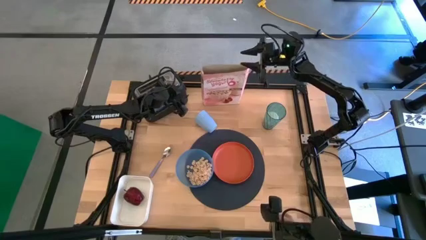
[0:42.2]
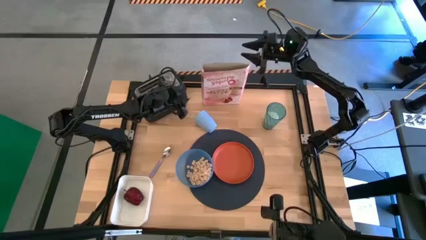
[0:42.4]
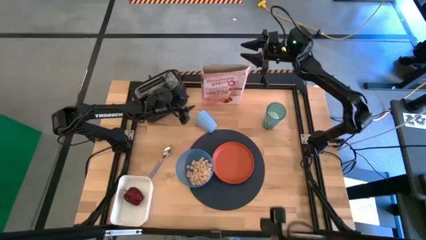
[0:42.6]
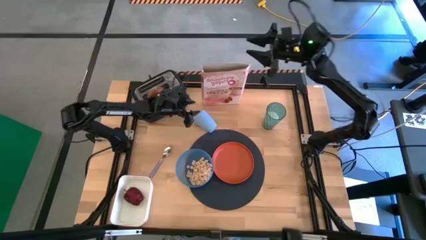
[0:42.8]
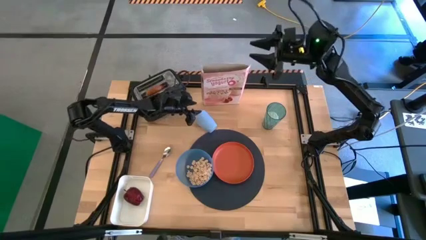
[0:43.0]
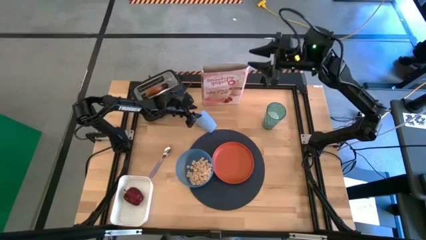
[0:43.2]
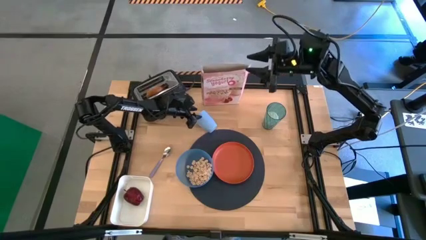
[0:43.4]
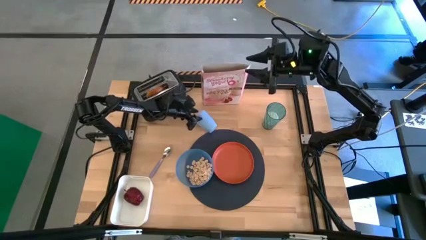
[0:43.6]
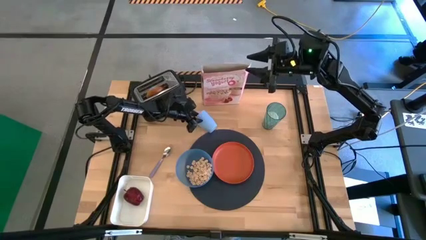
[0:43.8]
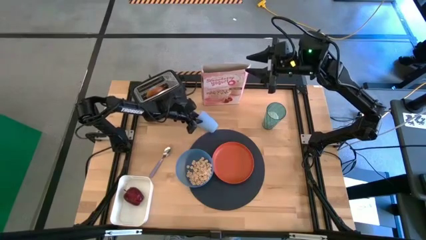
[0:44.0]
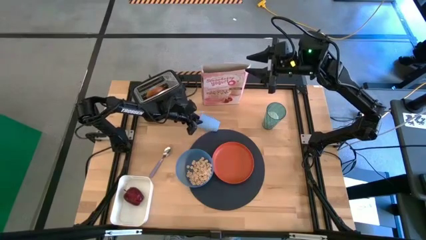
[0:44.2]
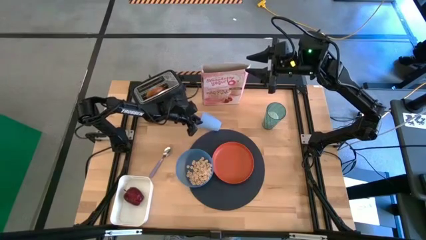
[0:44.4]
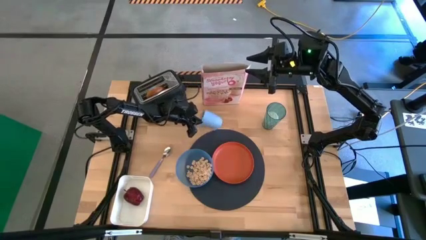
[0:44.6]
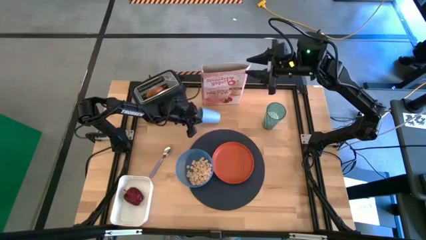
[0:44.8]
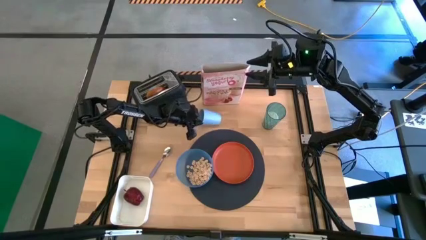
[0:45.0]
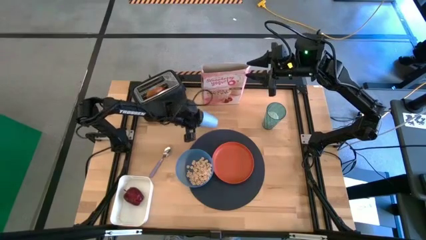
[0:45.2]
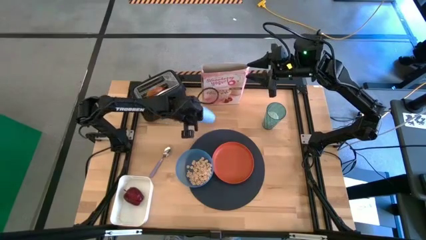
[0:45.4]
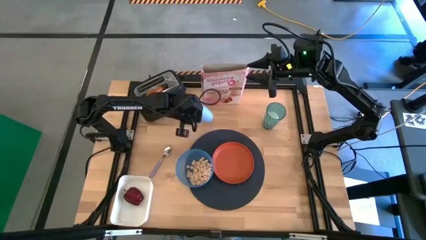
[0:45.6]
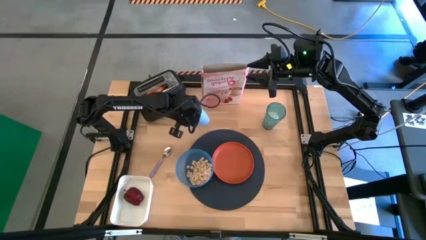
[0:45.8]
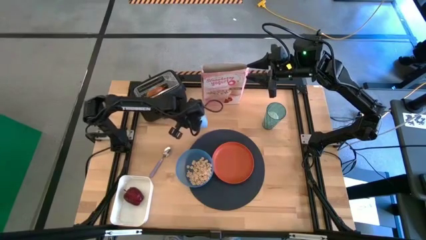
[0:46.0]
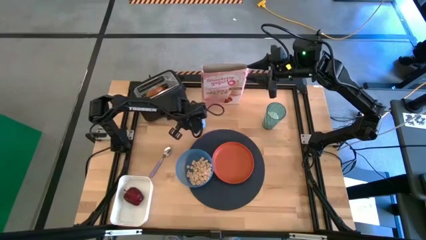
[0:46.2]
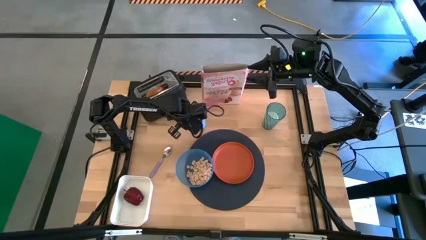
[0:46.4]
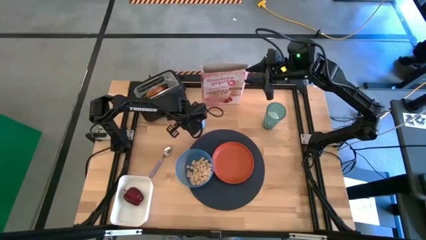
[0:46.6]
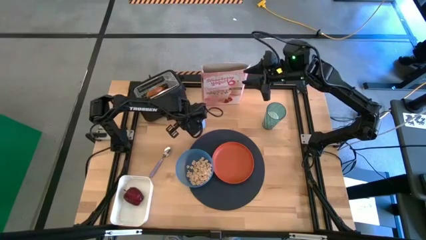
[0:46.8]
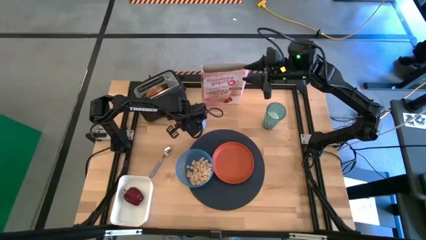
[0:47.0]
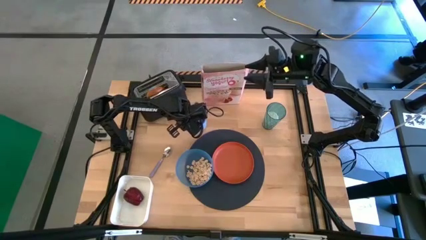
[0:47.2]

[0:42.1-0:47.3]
Task: Arrange a breakfast setting
Adjust the blue cup on the table

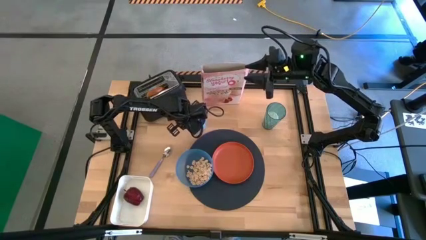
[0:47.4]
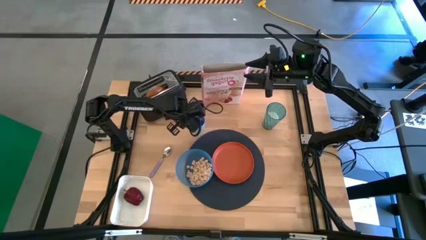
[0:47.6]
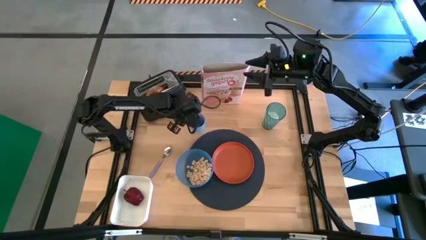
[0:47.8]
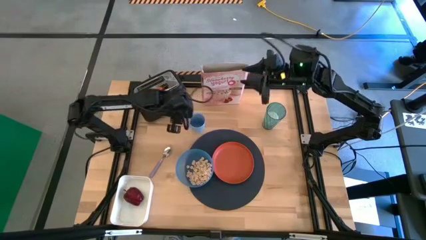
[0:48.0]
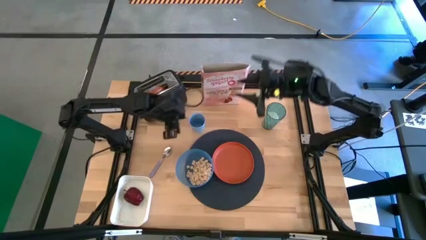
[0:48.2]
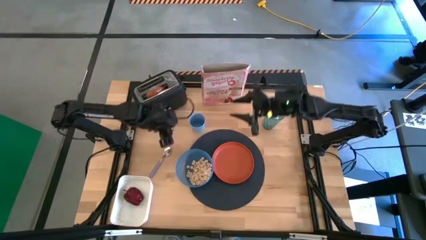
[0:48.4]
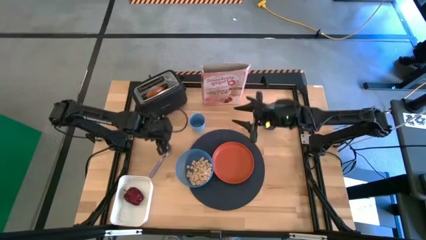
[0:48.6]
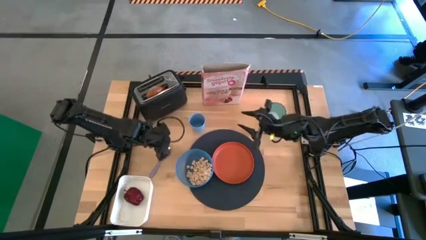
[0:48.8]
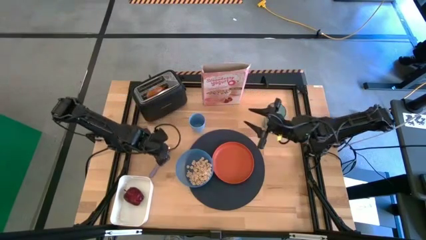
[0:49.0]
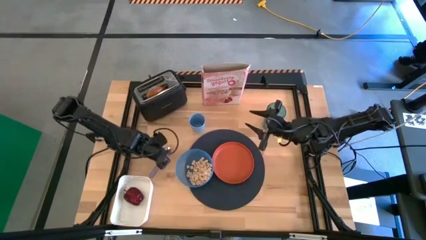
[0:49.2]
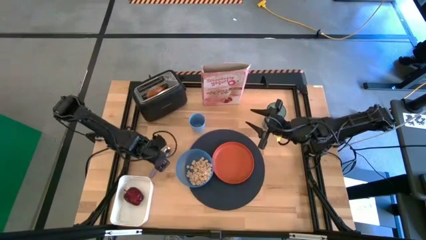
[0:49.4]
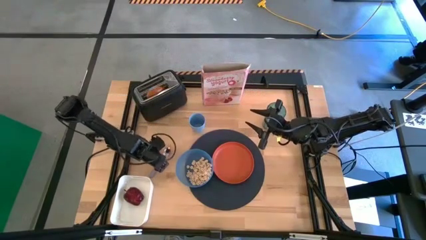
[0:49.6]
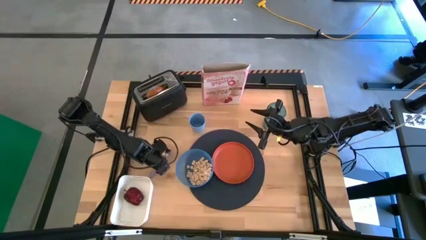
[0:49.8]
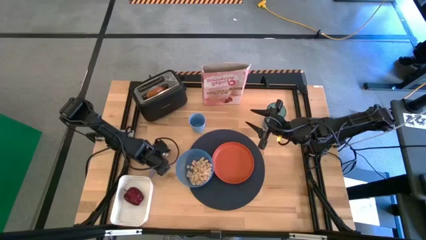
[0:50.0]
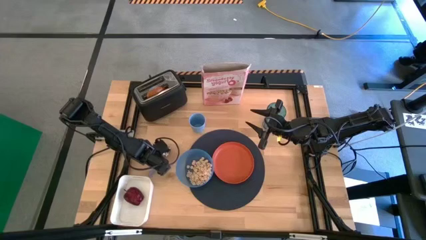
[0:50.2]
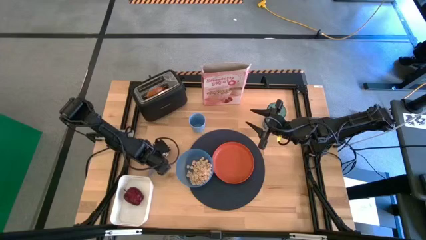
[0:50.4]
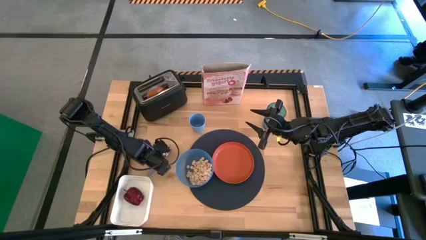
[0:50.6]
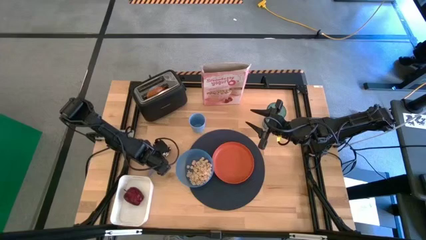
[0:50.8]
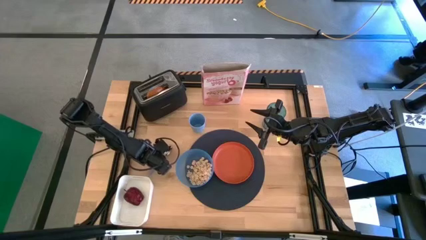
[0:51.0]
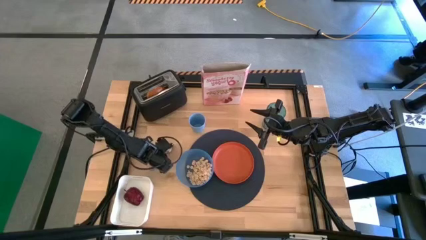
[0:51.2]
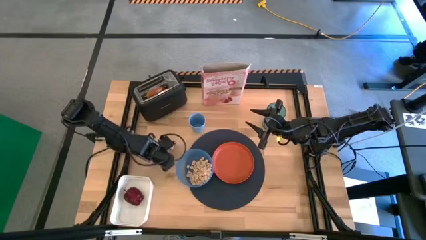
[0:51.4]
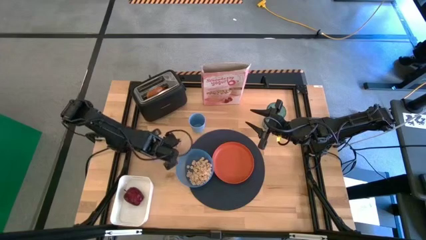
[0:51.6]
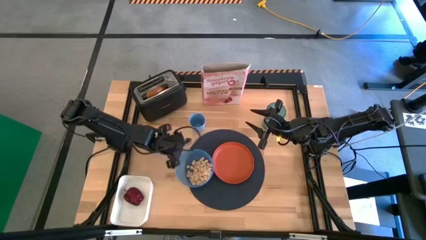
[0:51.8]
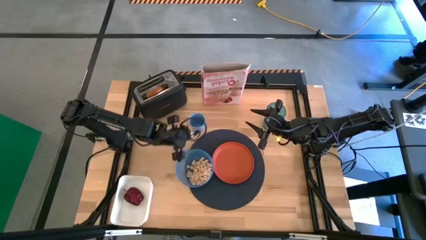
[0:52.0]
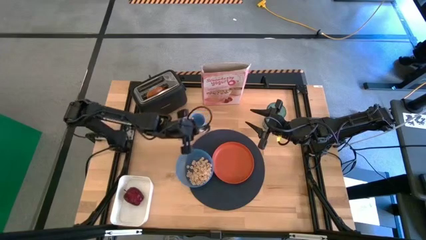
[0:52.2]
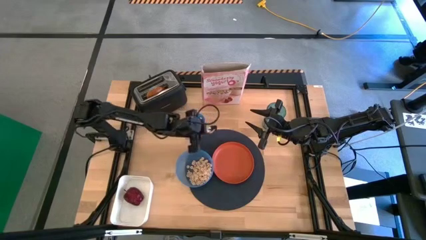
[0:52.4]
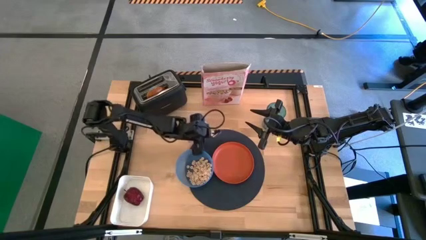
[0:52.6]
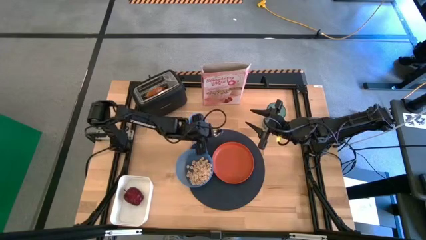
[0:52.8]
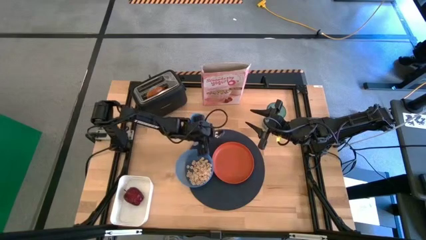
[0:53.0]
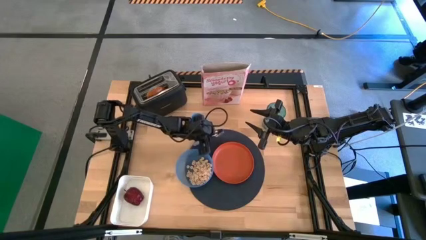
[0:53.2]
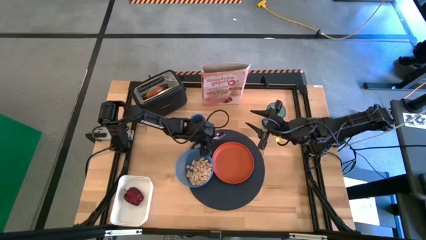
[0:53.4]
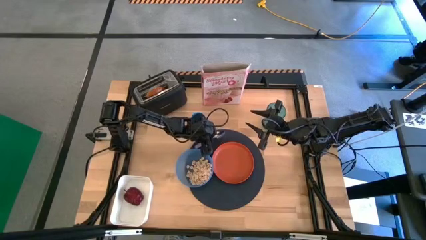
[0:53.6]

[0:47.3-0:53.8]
Put the purple spoon on the table mat

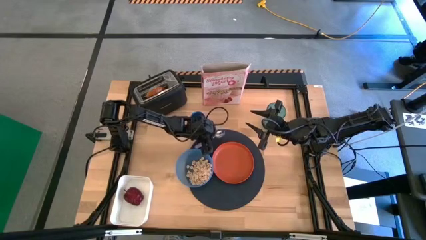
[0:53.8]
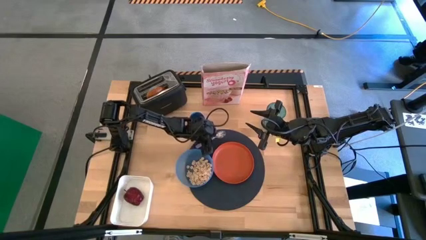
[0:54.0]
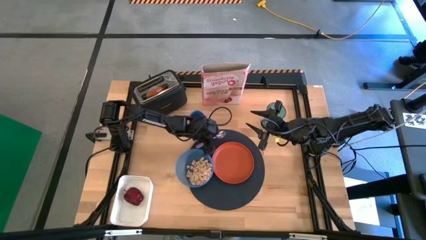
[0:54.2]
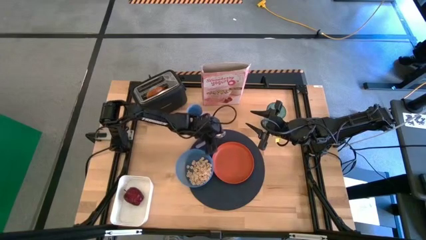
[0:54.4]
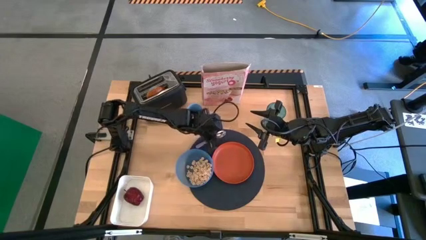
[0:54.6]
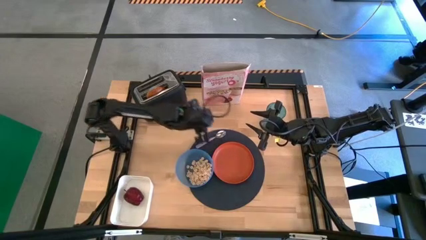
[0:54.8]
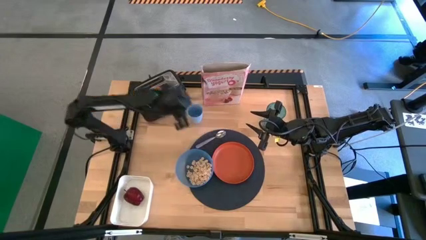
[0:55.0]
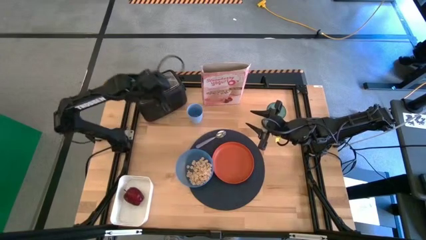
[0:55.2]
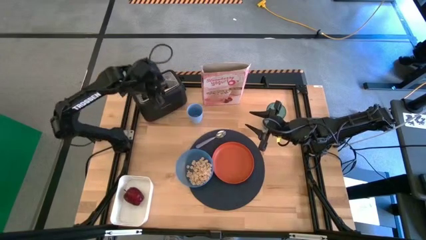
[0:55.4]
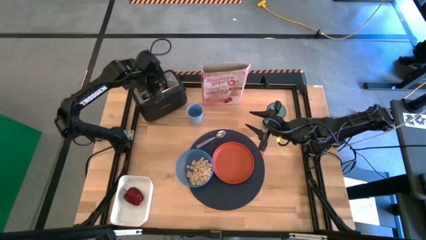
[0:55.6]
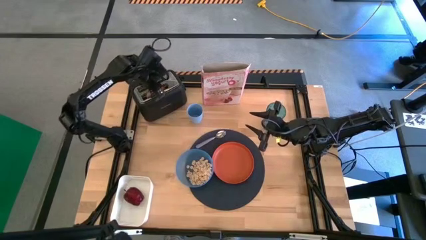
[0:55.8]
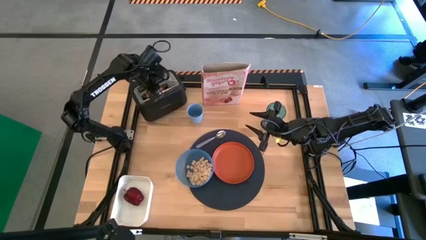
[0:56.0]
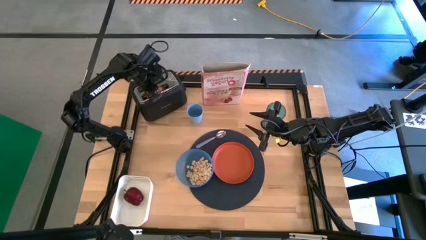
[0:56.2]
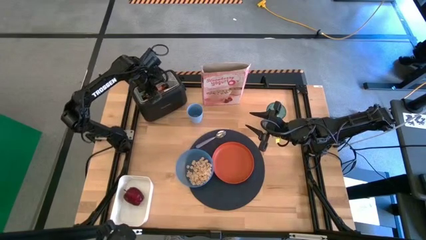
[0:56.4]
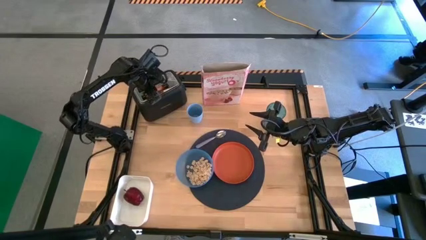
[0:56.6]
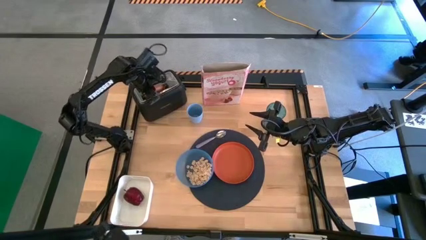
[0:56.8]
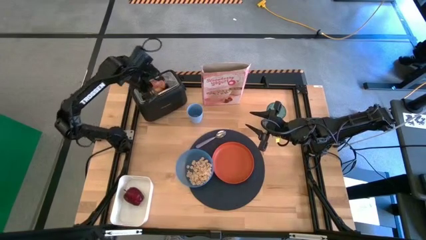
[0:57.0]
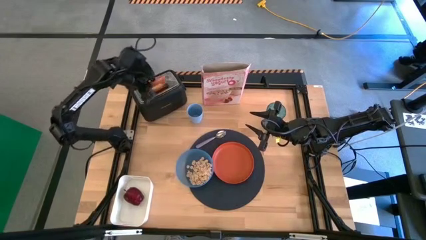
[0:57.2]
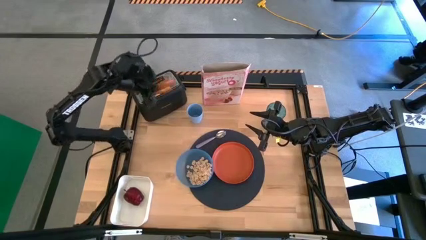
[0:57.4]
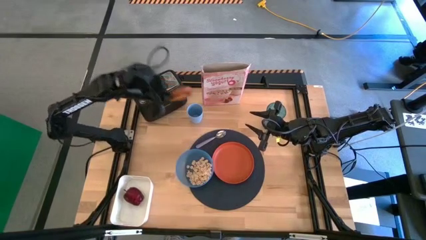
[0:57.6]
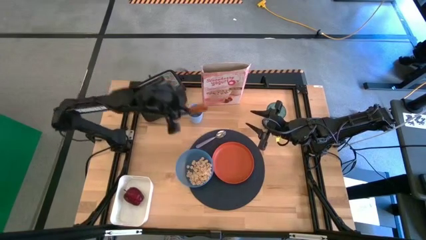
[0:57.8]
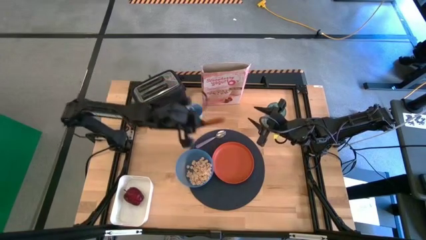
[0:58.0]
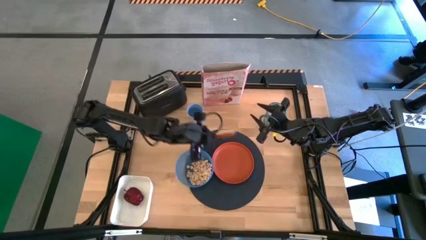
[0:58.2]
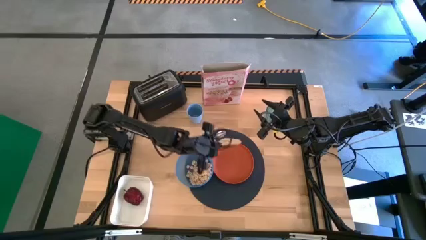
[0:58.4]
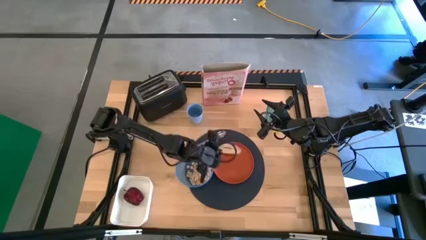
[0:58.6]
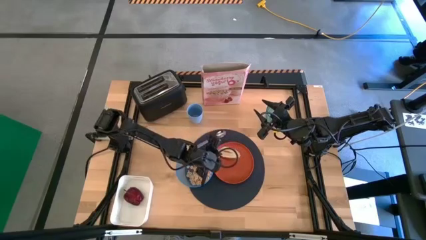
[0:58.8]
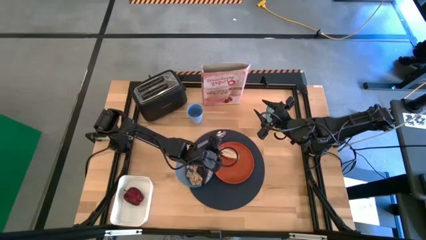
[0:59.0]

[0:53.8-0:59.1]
Put the toasted bagel on the orange plate
